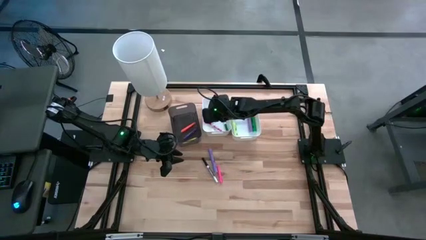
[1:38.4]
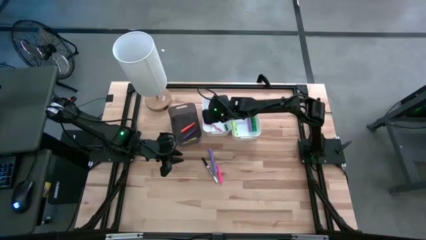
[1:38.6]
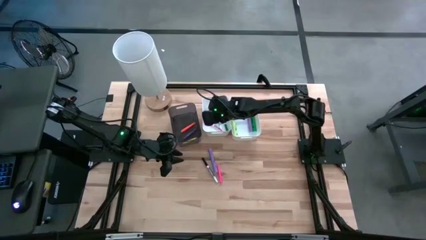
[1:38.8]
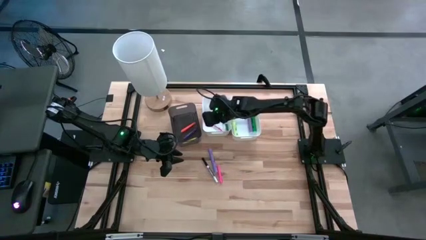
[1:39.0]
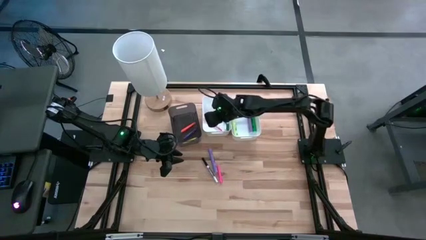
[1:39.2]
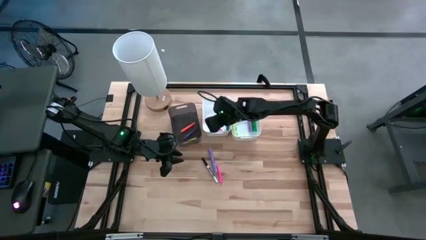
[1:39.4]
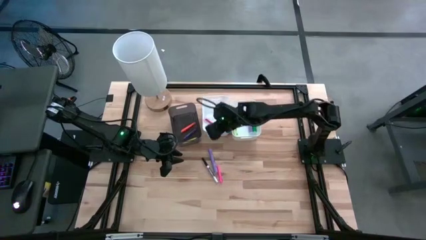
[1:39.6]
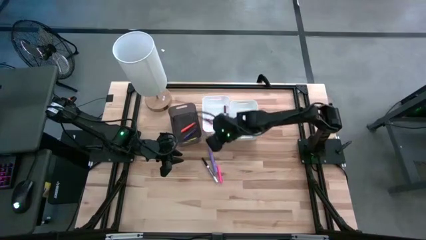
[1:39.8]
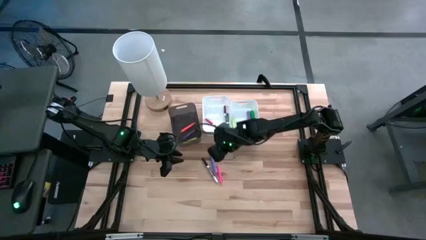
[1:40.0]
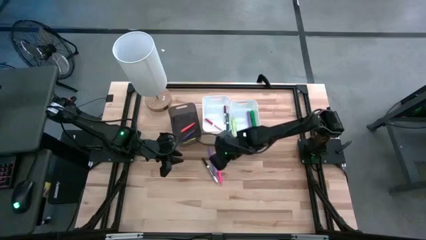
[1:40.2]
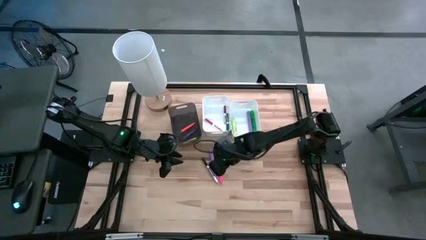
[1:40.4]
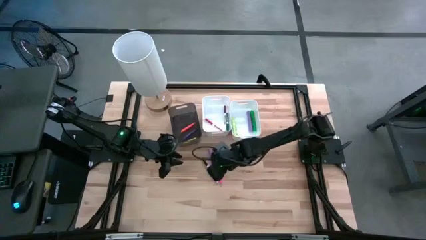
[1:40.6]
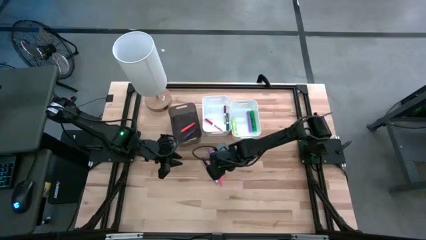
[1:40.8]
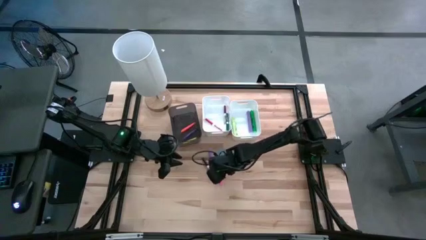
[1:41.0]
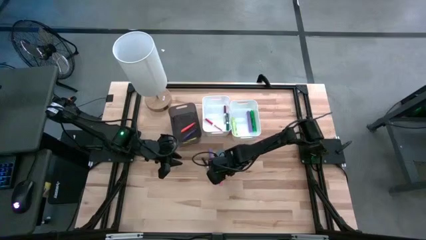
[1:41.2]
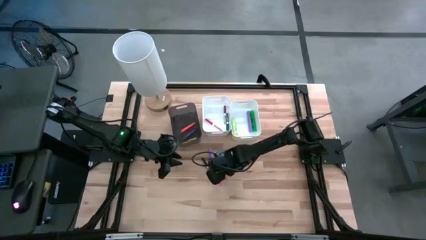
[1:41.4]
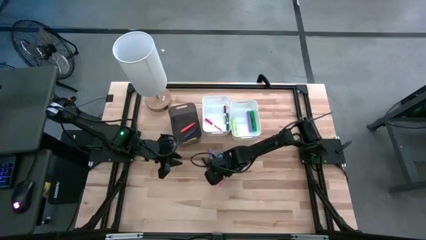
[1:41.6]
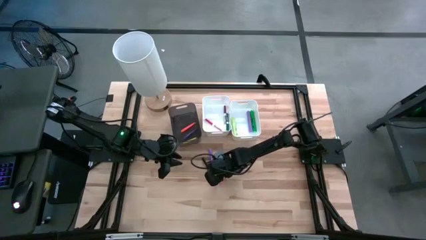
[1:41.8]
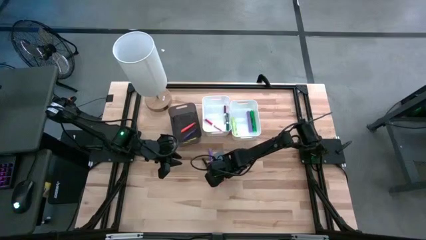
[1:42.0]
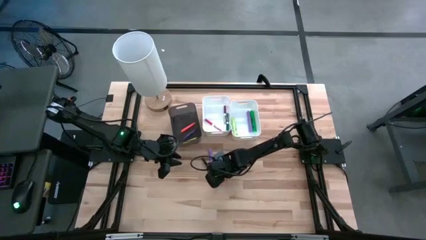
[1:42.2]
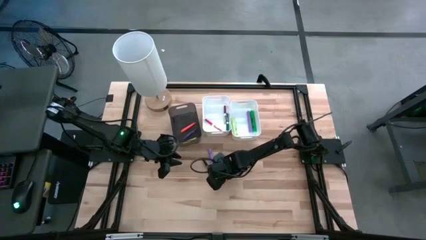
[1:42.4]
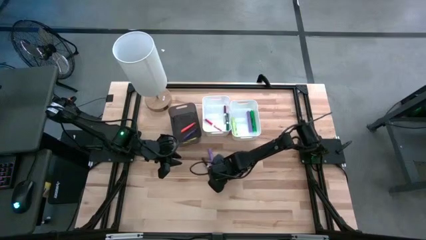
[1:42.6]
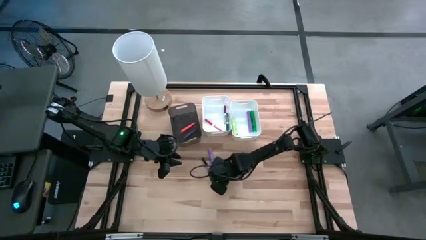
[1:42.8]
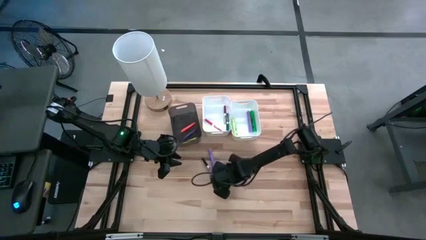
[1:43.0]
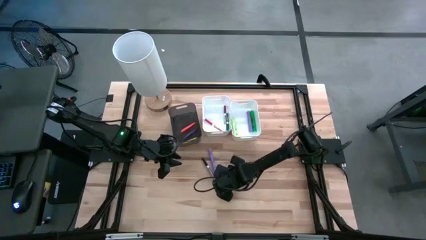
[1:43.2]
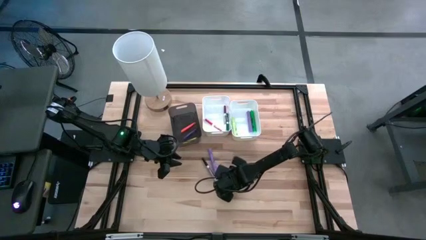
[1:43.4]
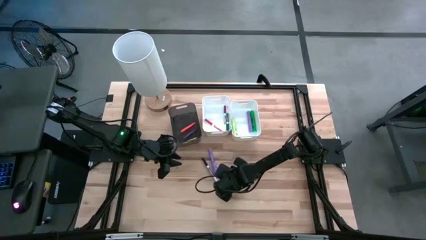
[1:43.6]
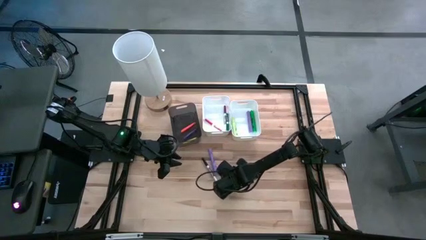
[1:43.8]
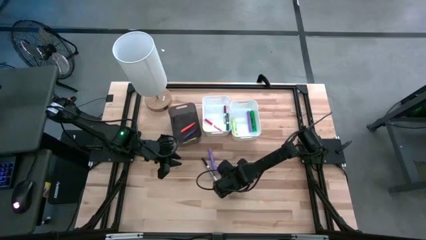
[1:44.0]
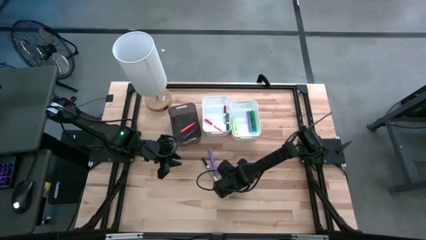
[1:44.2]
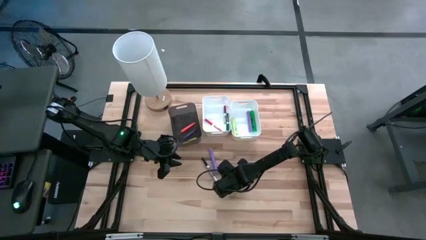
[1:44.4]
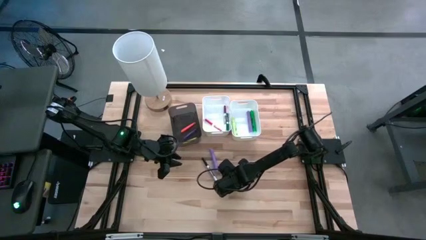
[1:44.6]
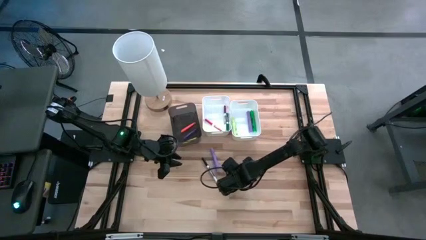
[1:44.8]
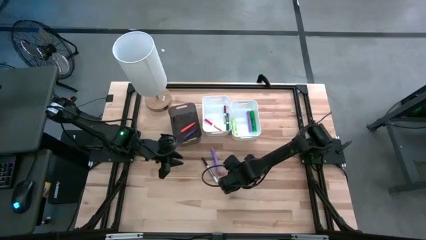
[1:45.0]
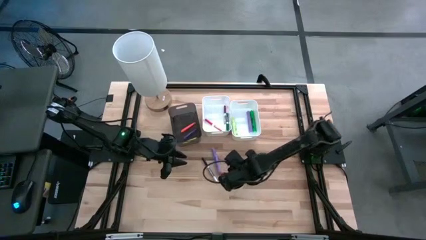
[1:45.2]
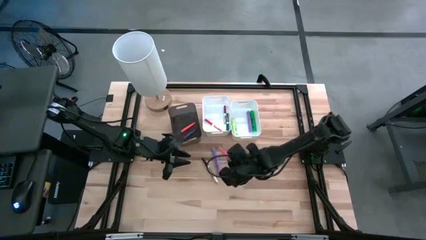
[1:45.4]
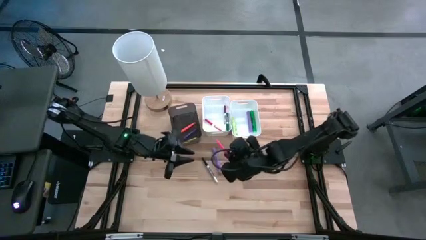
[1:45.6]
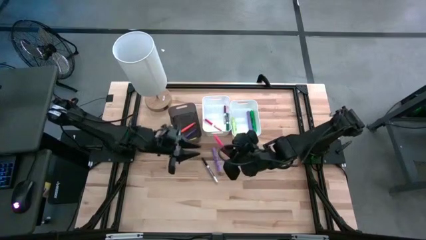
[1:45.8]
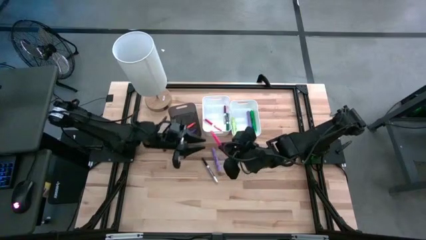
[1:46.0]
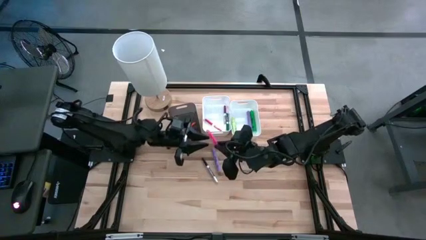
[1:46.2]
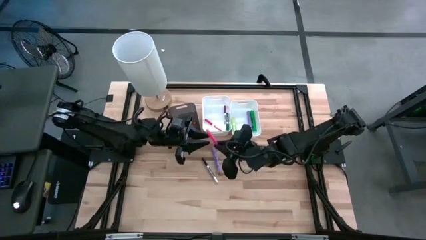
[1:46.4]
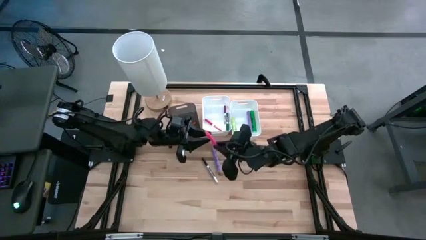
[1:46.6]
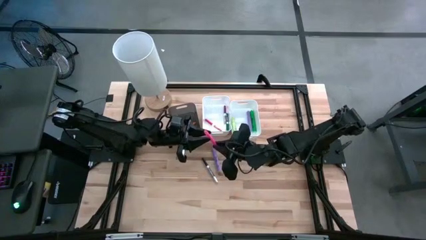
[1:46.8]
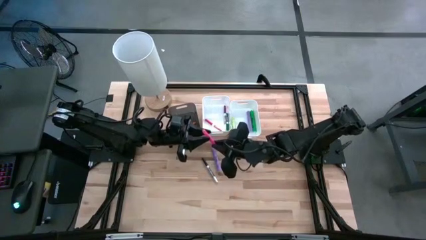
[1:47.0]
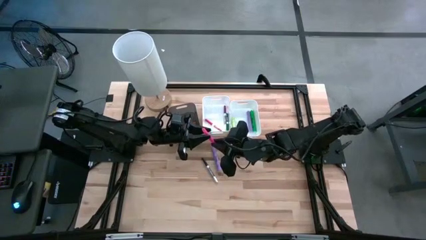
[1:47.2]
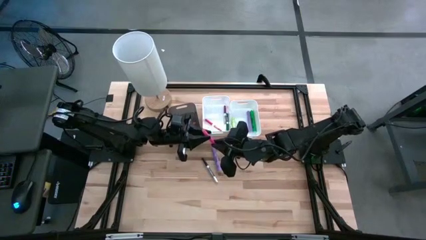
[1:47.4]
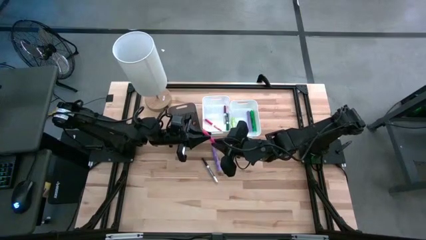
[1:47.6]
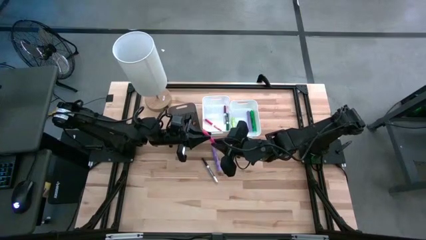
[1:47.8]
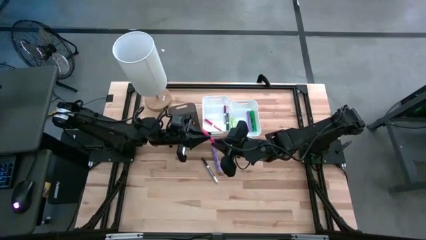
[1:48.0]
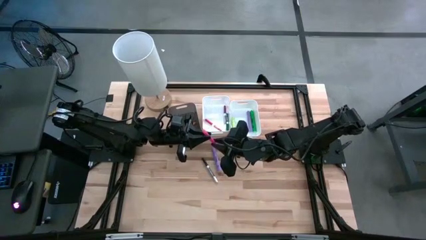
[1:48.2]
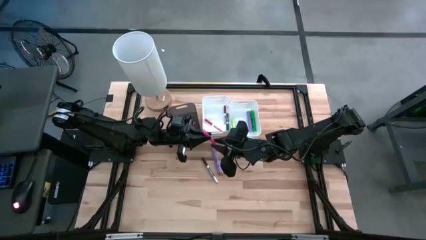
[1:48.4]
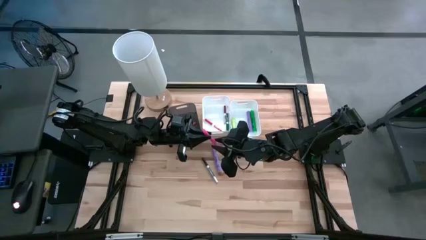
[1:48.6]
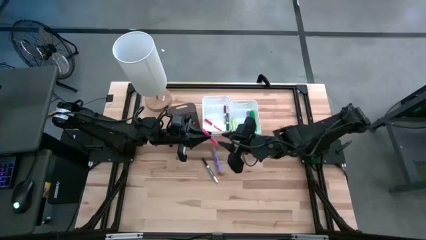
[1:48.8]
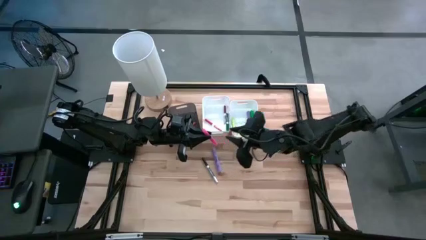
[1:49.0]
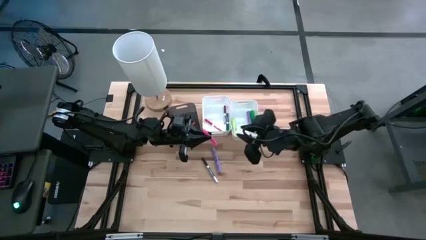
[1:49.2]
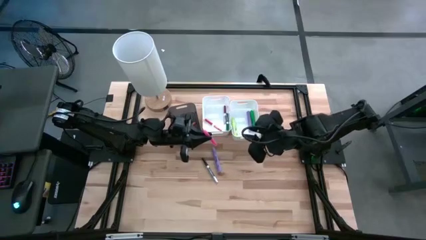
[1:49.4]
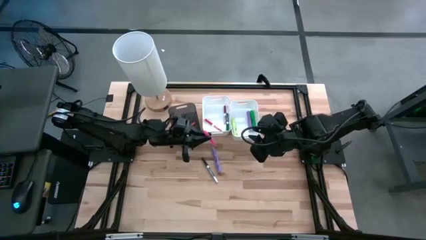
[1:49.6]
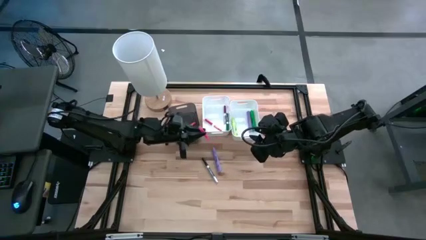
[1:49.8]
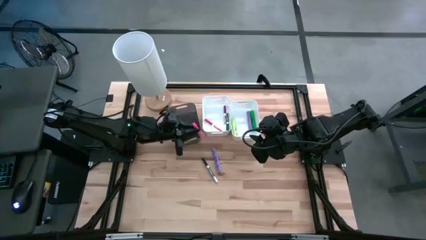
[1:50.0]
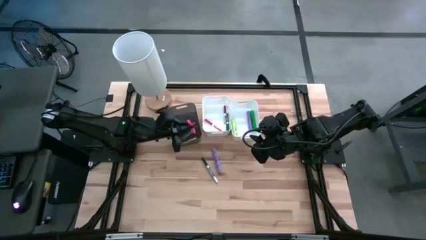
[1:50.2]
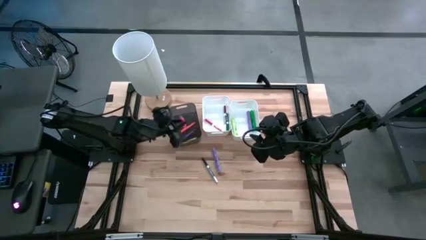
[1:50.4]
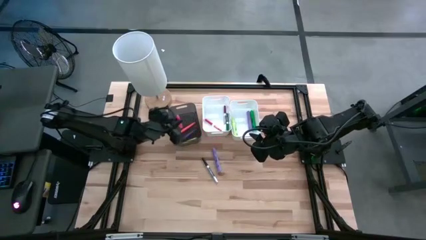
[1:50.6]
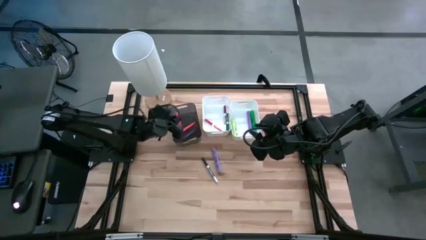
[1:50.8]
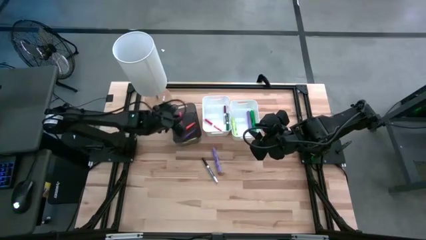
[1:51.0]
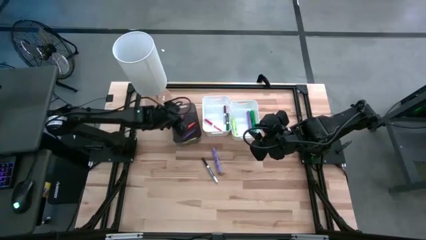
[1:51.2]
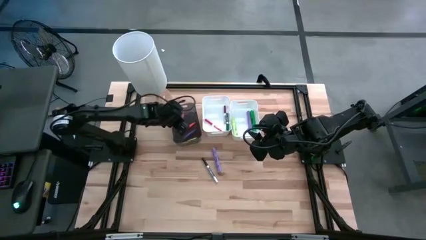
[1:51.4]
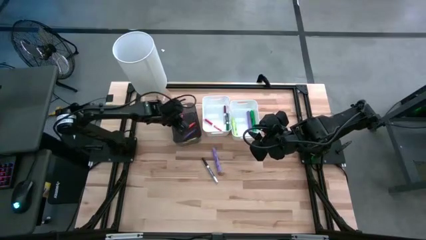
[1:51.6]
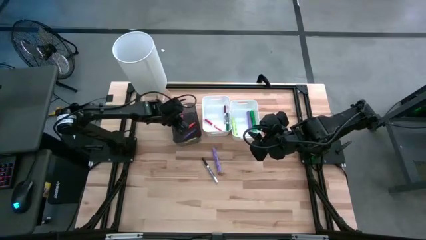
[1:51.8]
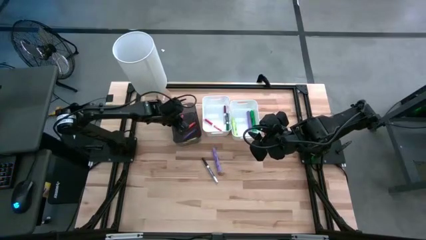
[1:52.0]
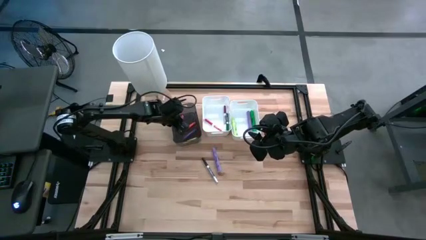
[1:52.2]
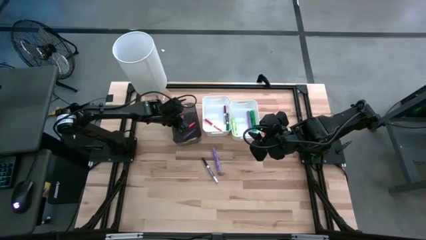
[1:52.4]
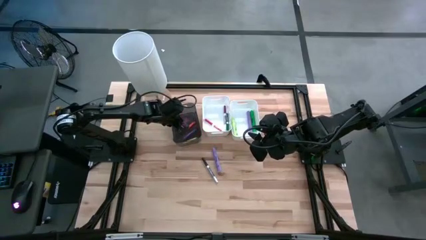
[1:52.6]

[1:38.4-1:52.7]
Task: Pick & Place Markers
Put the pink pen into the black bin
